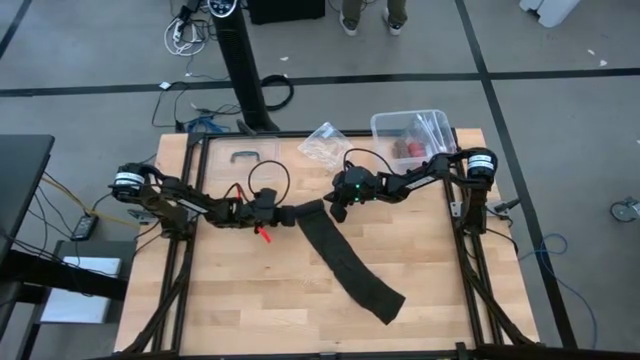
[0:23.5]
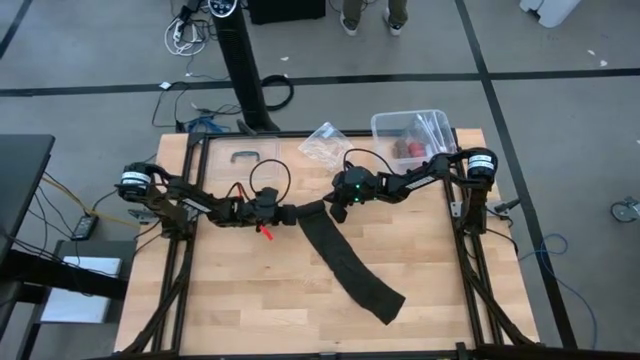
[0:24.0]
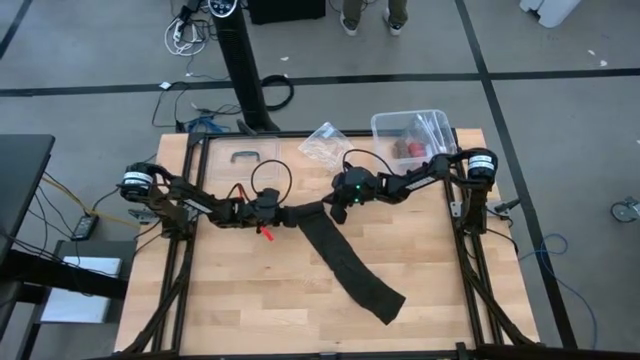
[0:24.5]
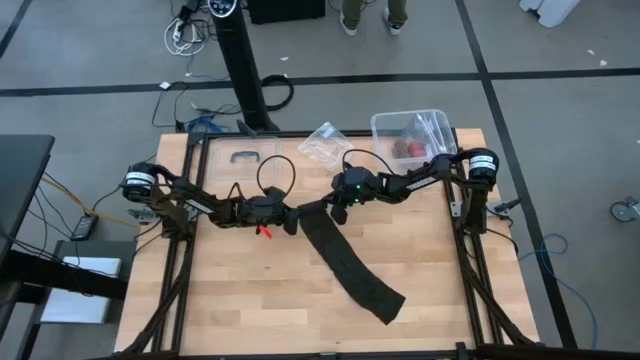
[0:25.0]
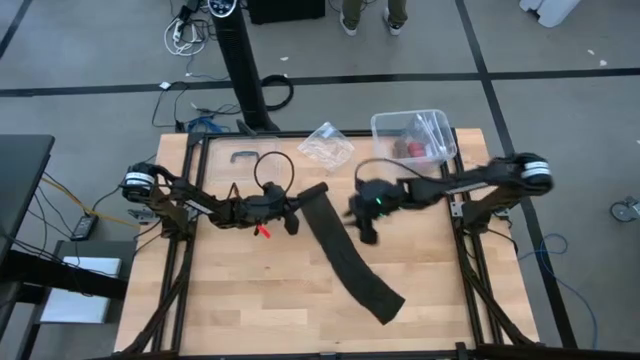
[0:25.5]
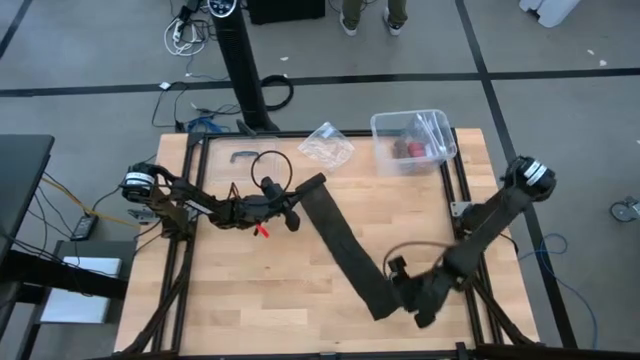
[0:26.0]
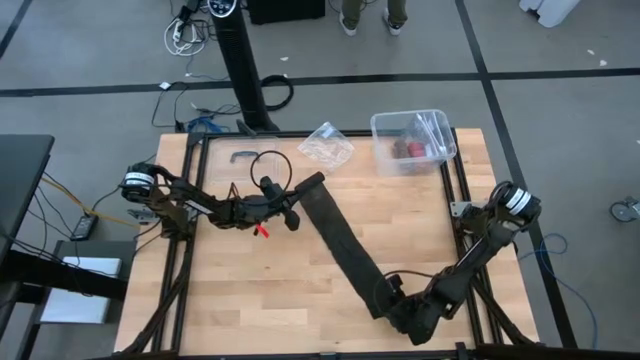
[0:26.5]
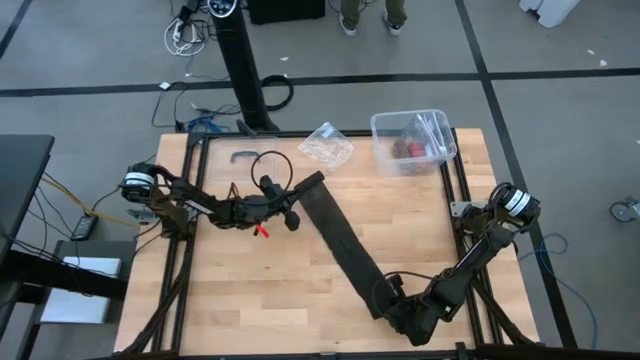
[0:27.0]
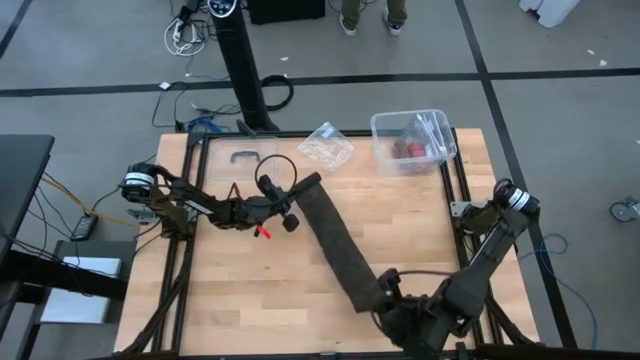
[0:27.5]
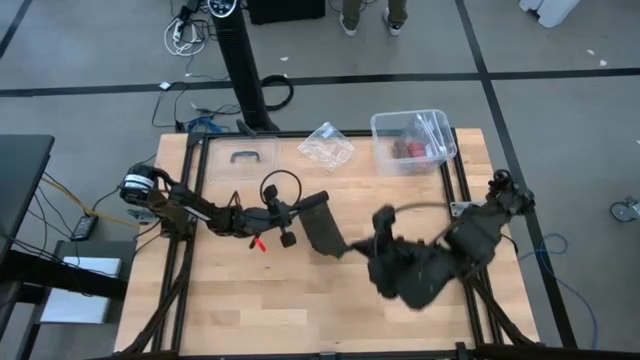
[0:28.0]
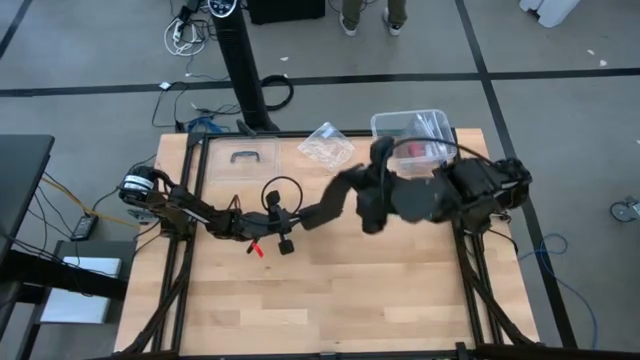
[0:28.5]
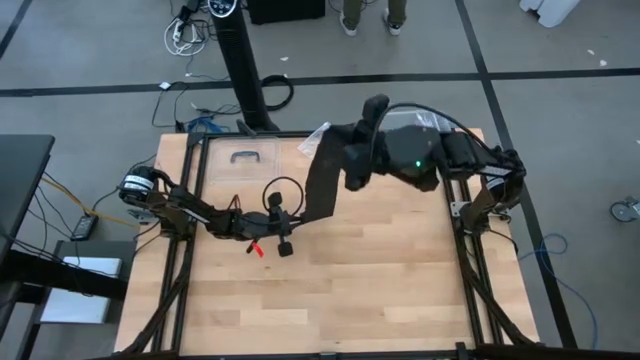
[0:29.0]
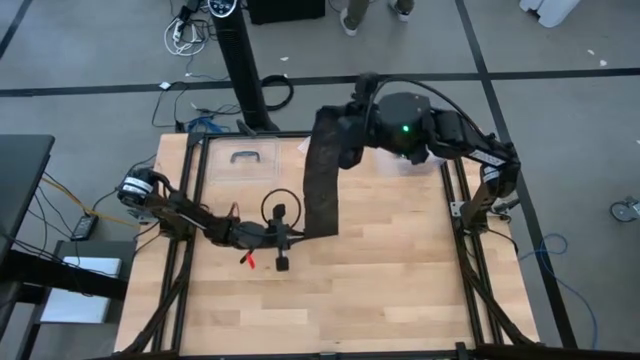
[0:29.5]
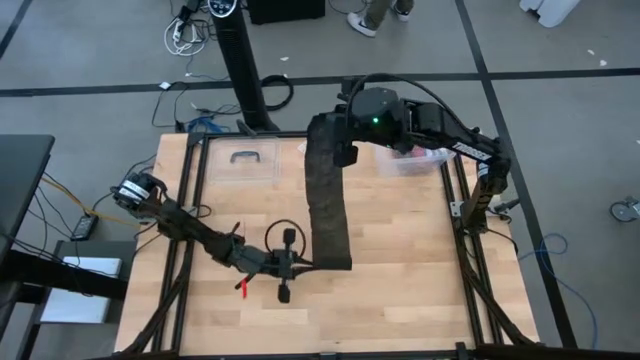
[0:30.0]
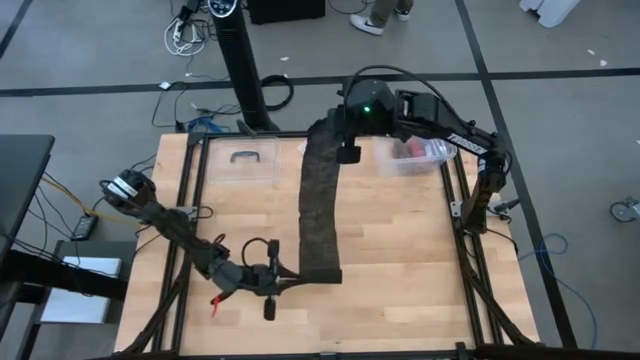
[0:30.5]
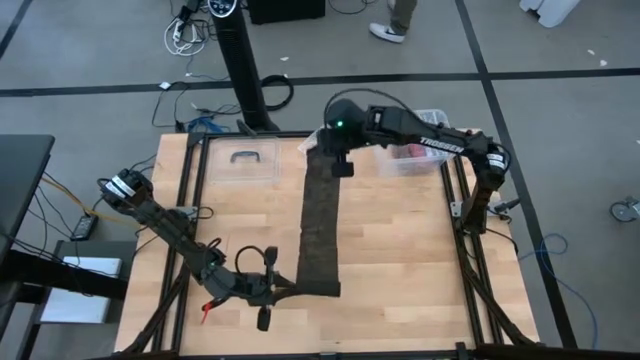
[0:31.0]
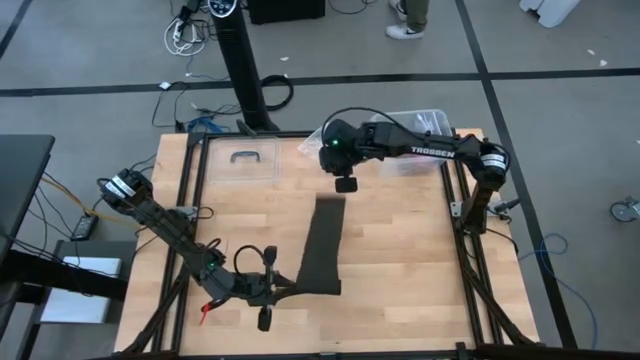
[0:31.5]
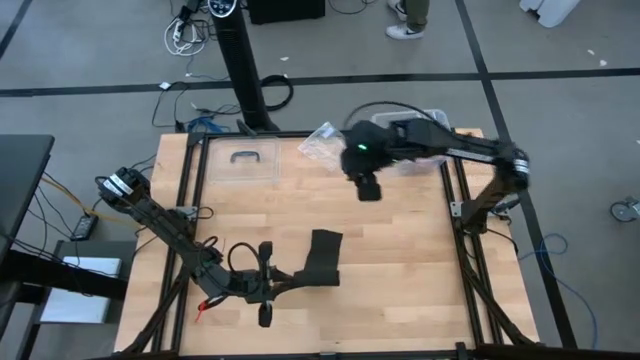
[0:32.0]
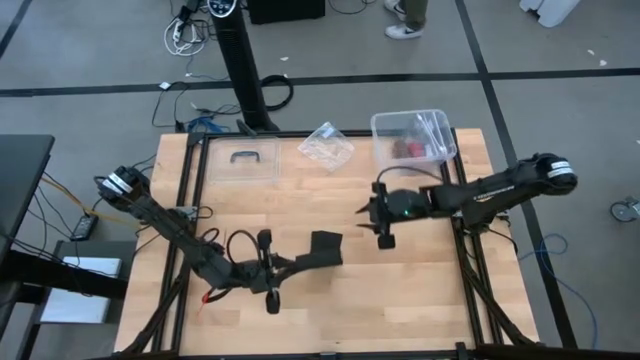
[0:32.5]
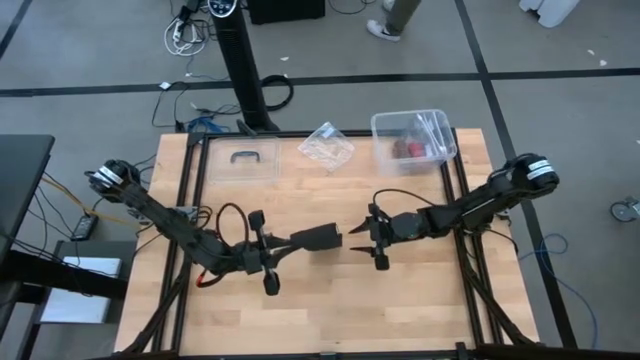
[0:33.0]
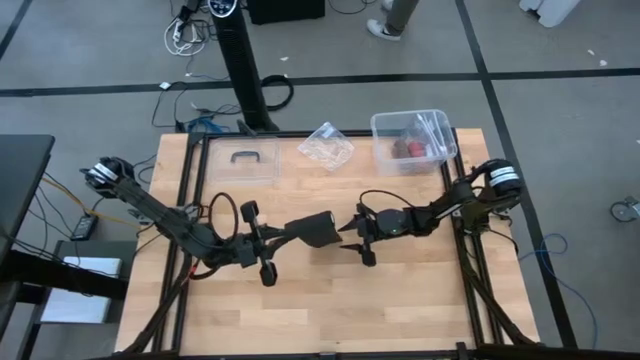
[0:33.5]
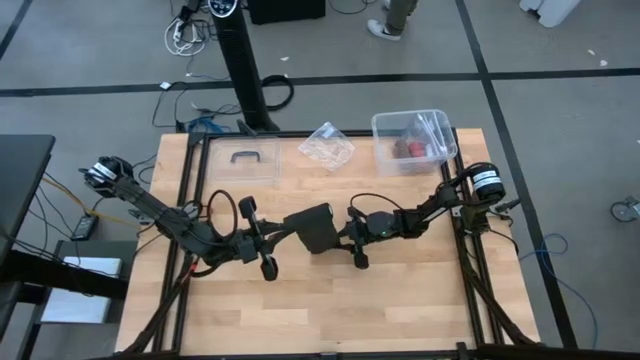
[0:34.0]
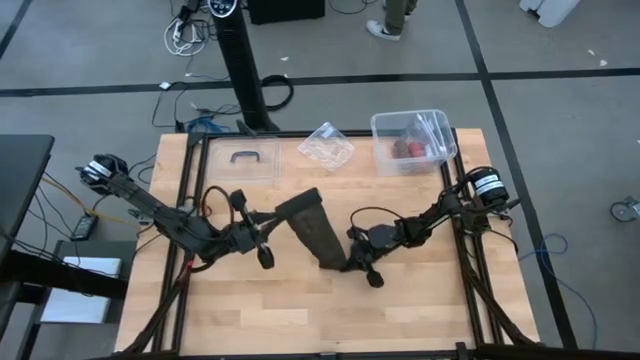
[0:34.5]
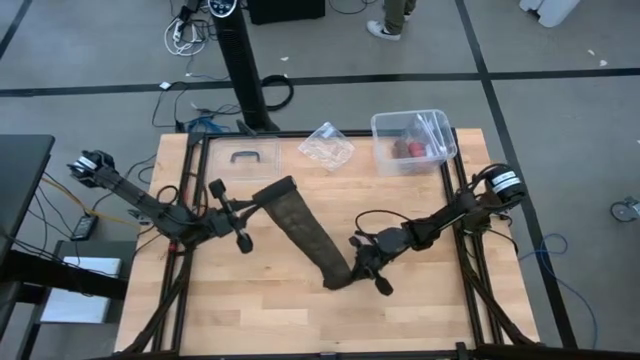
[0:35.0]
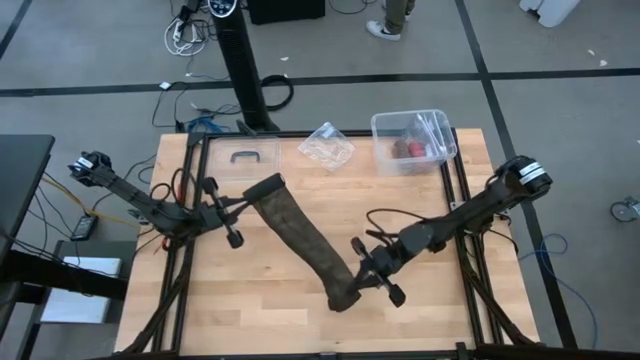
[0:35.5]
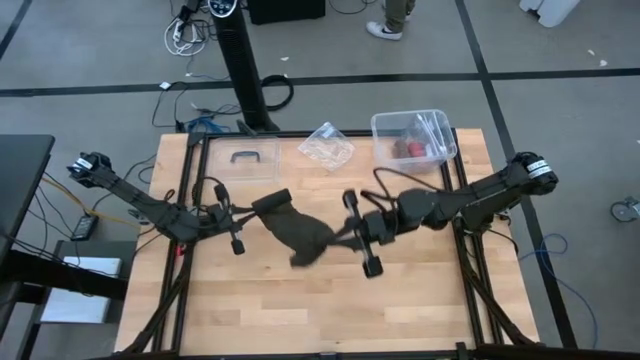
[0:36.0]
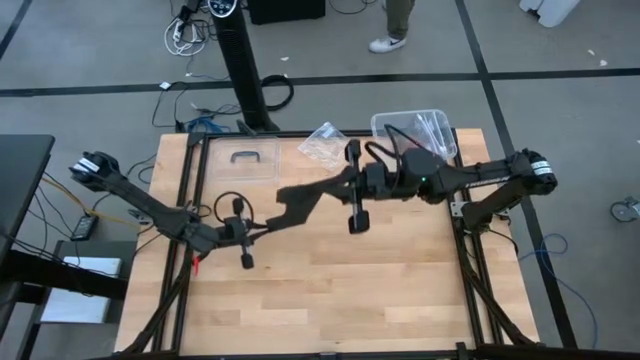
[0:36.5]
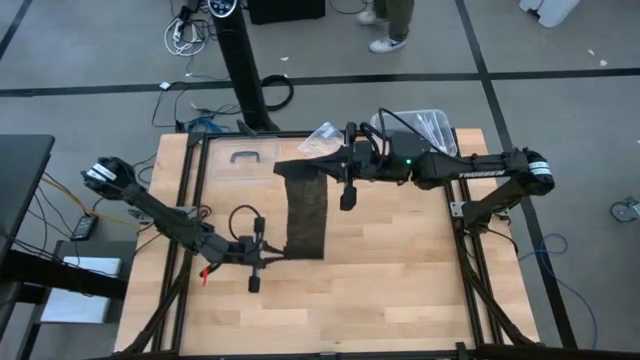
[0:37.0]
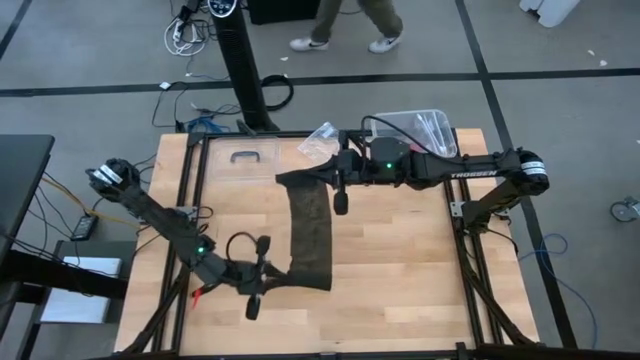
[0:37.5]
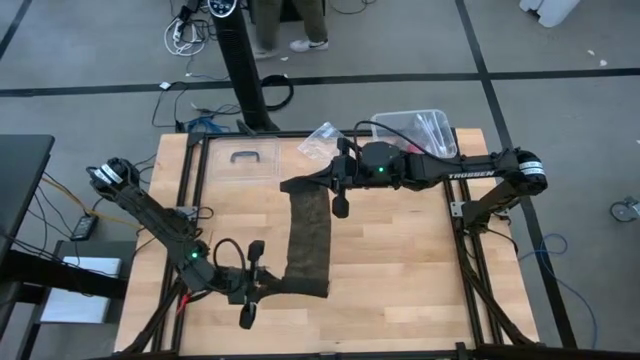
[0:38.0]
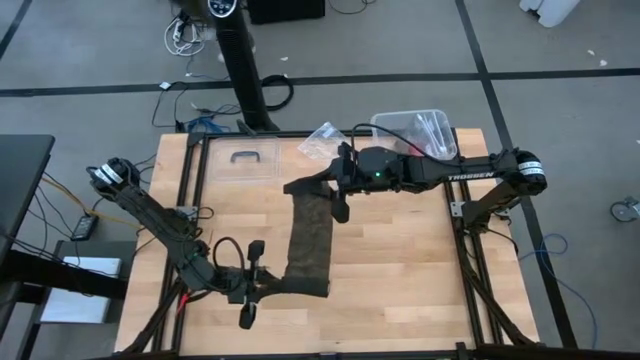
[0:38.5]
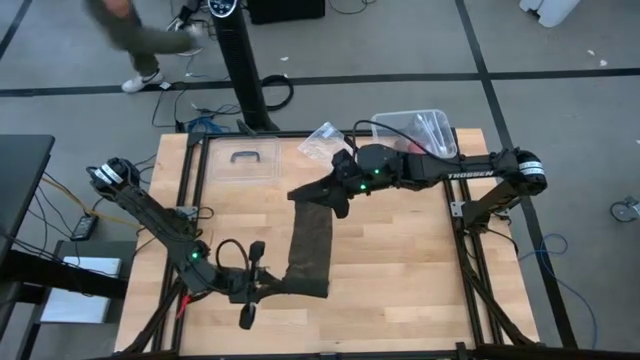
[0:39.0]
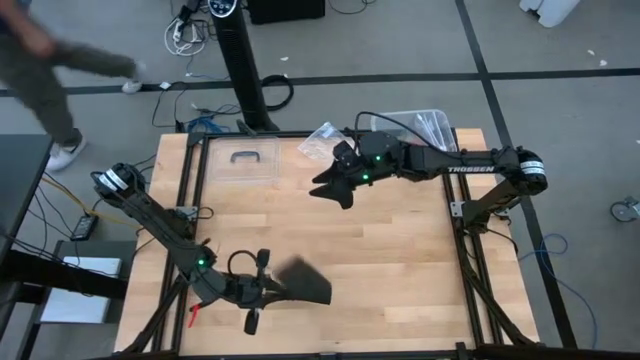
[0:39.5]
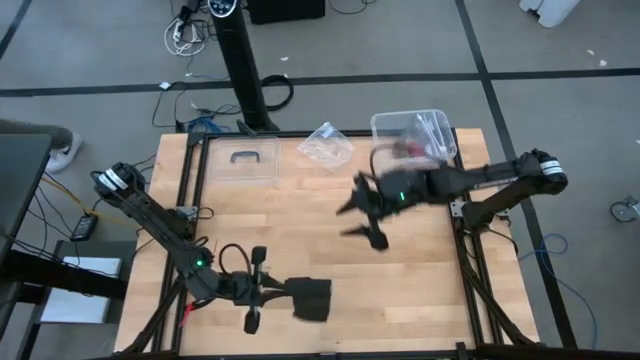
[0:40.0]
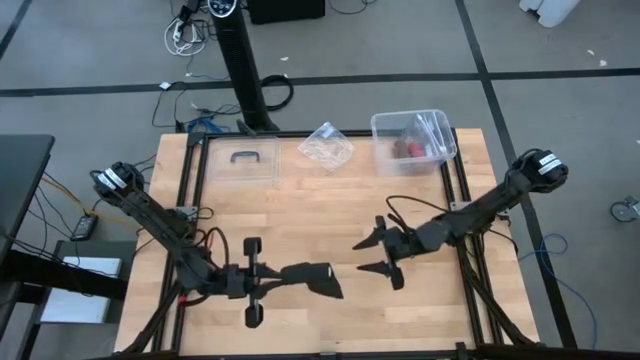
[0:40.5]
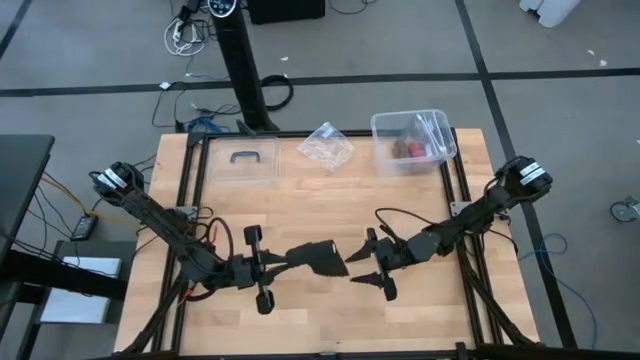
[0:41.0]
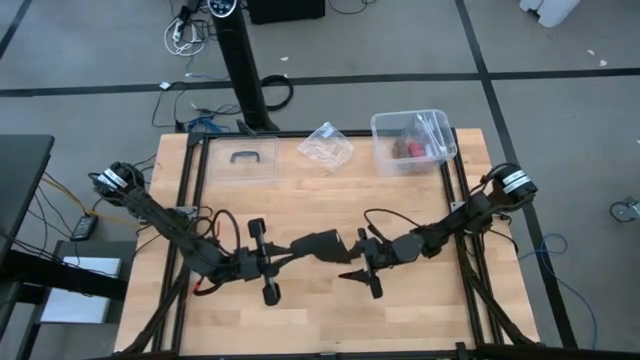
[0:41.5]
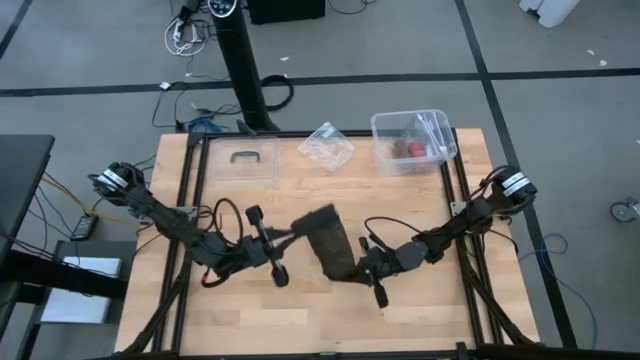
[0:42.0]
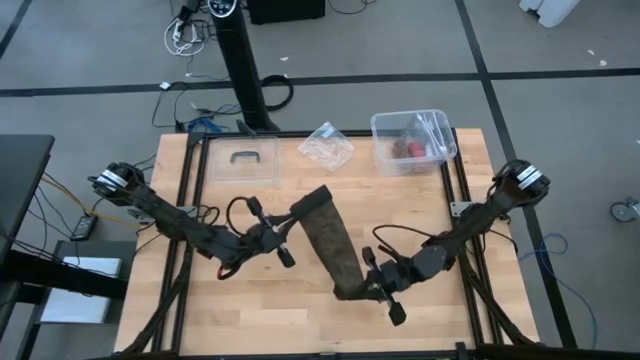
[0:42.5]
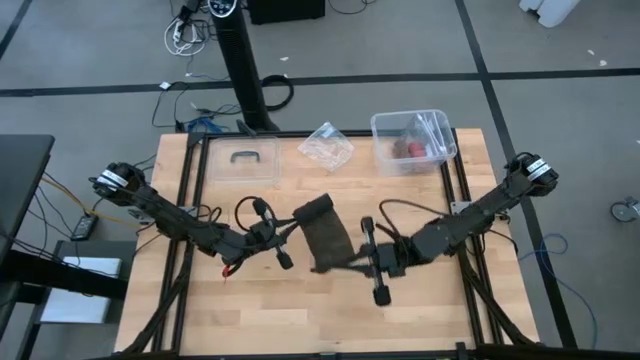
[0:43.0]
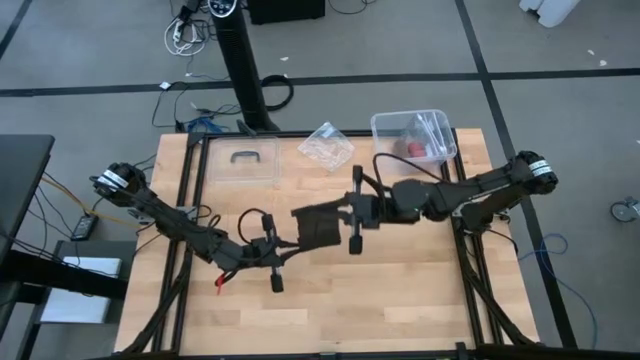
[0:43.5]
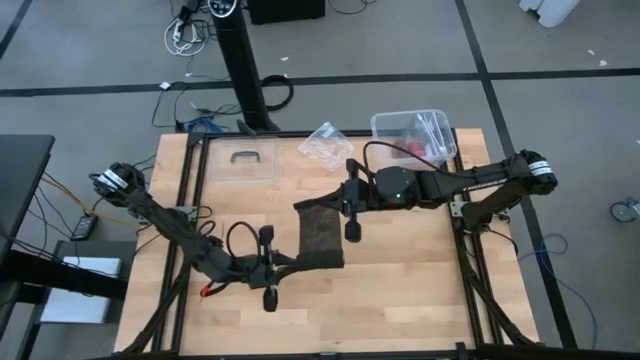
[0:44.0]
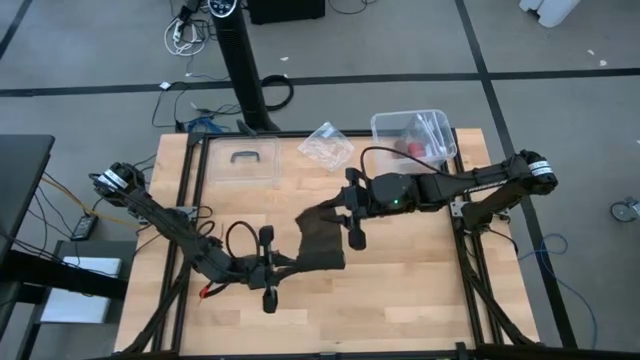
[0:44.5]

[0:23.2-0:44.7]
Task: Roll bandage
Roll the black bandage
